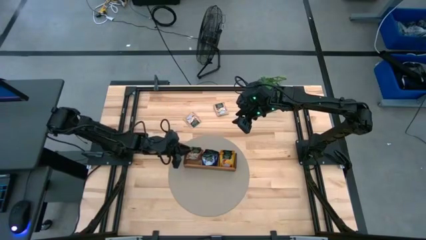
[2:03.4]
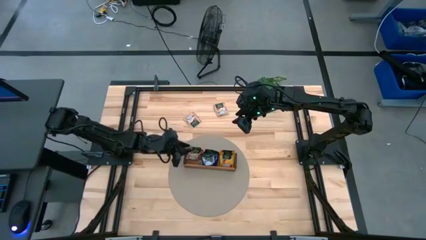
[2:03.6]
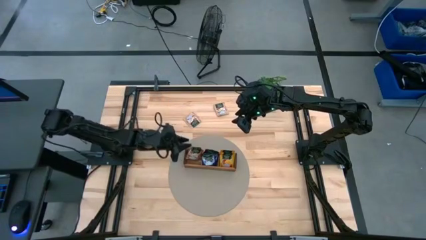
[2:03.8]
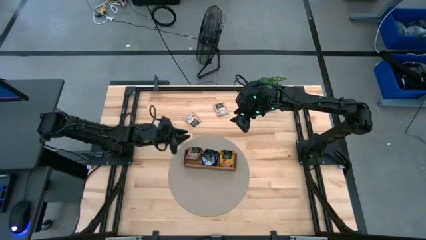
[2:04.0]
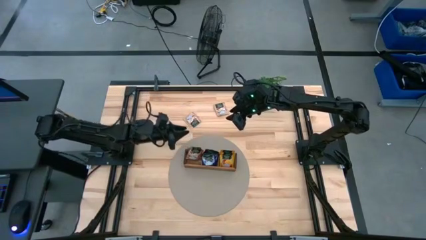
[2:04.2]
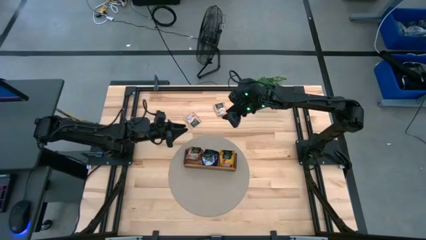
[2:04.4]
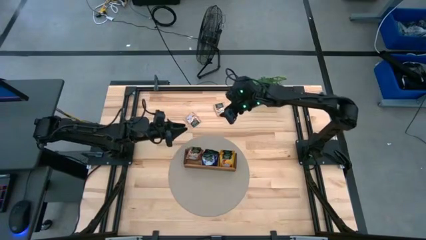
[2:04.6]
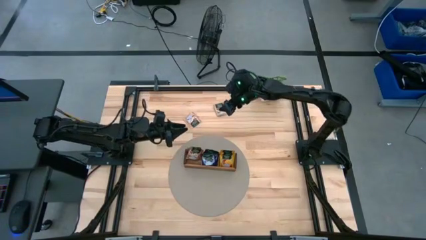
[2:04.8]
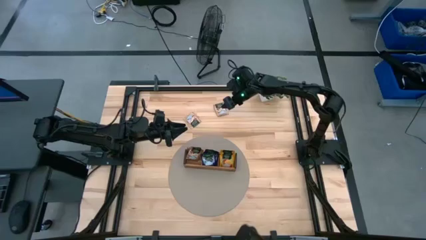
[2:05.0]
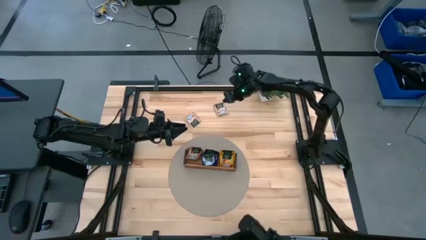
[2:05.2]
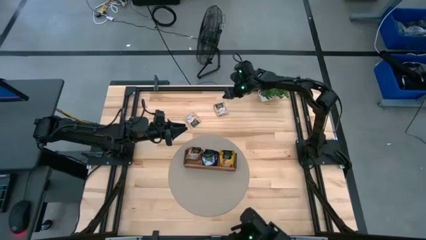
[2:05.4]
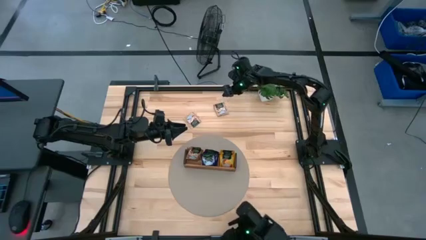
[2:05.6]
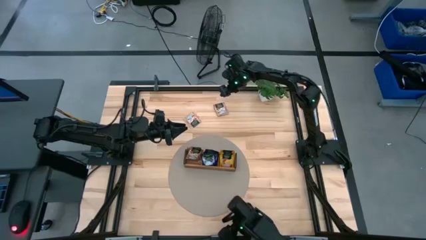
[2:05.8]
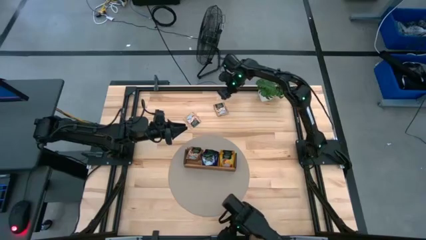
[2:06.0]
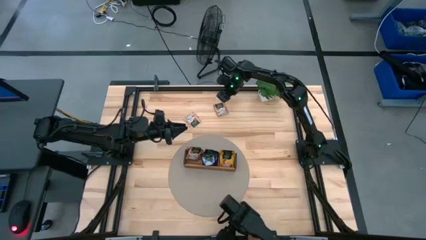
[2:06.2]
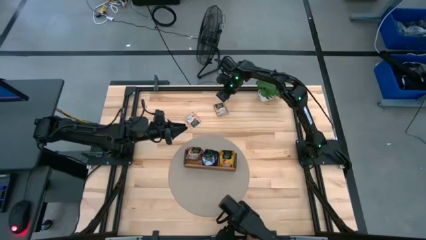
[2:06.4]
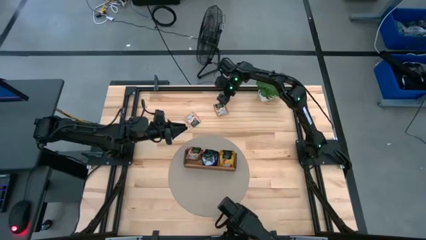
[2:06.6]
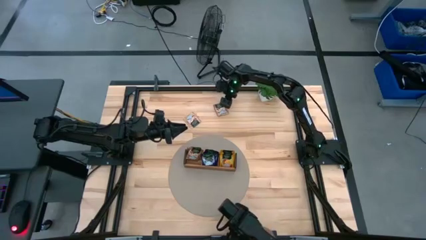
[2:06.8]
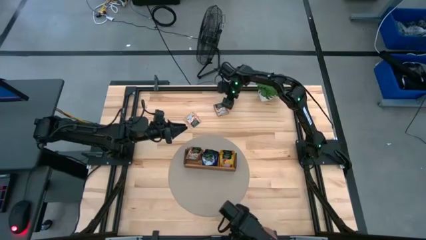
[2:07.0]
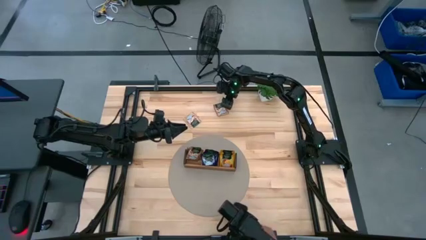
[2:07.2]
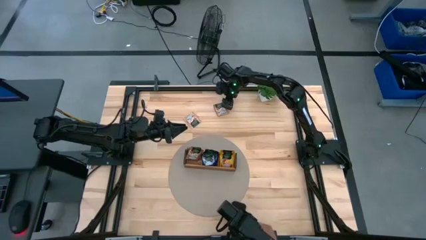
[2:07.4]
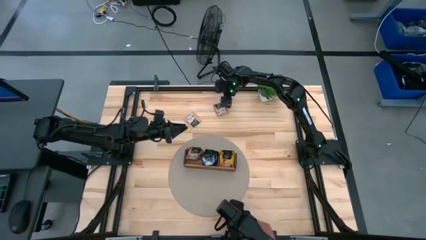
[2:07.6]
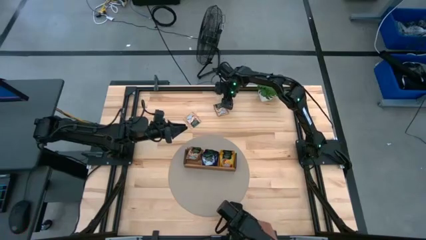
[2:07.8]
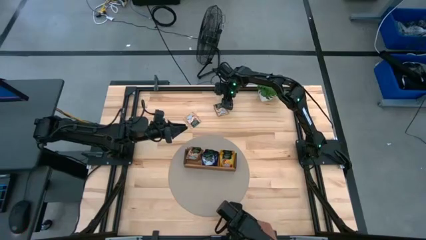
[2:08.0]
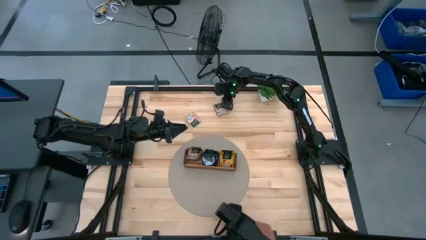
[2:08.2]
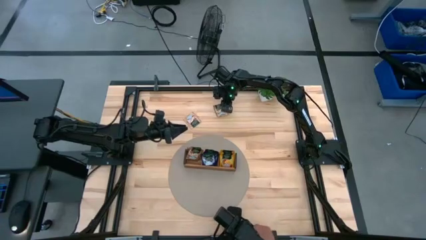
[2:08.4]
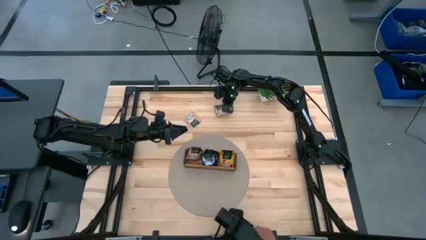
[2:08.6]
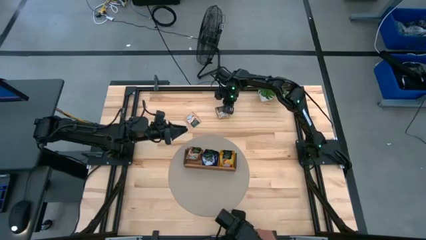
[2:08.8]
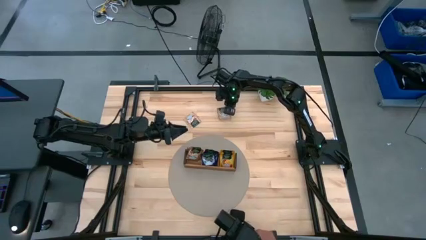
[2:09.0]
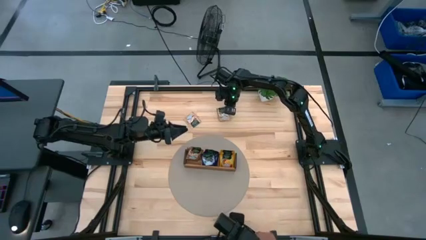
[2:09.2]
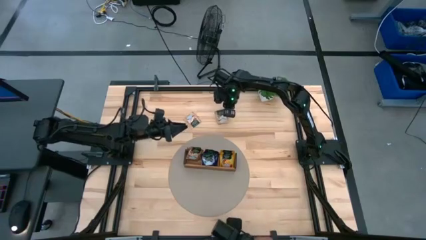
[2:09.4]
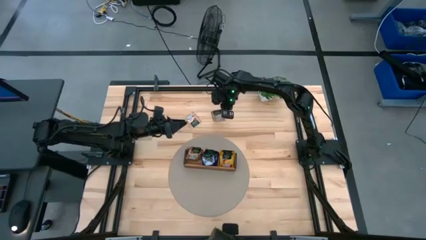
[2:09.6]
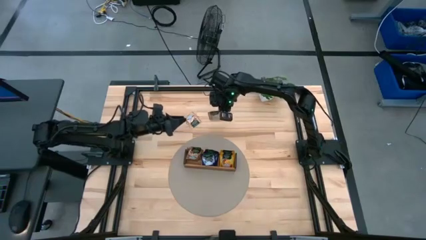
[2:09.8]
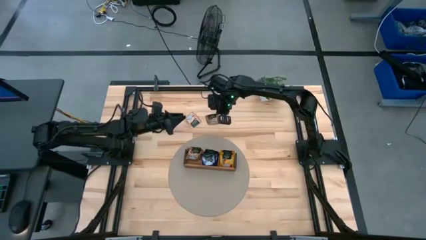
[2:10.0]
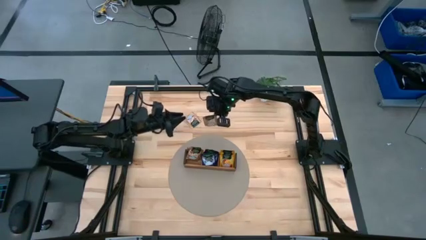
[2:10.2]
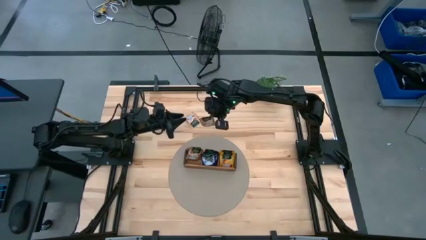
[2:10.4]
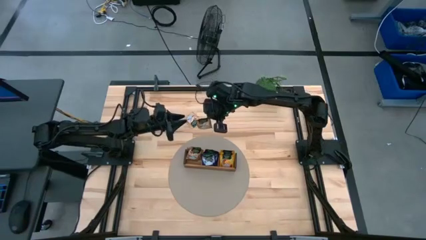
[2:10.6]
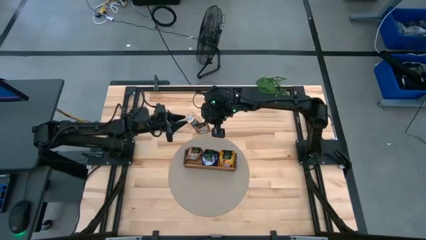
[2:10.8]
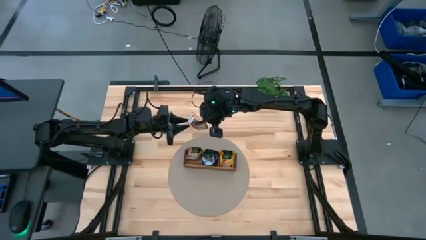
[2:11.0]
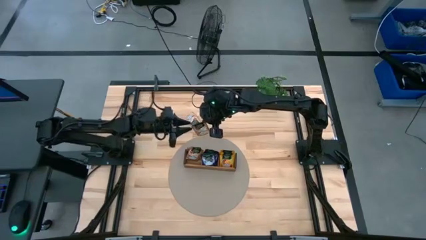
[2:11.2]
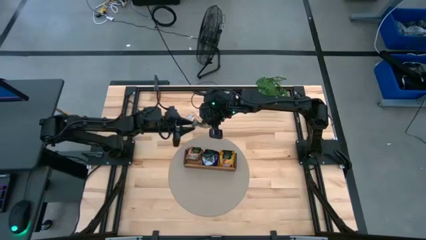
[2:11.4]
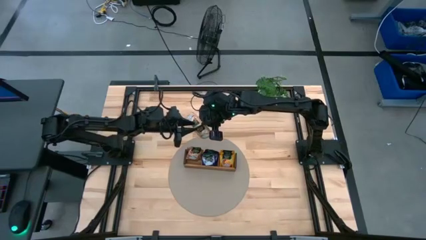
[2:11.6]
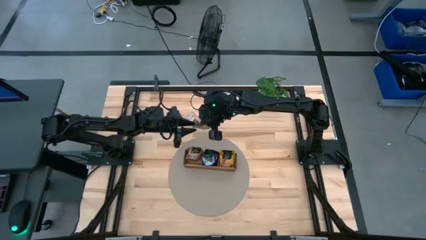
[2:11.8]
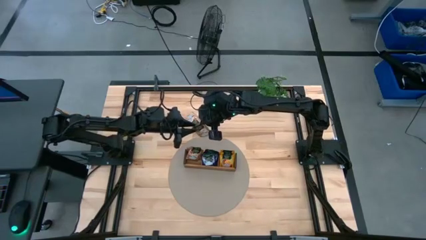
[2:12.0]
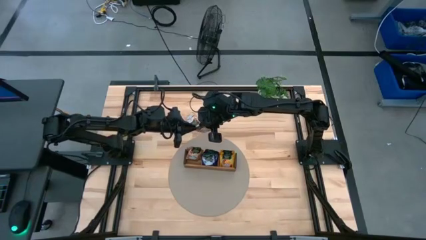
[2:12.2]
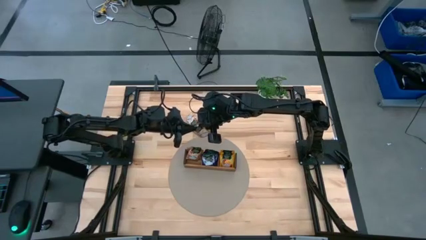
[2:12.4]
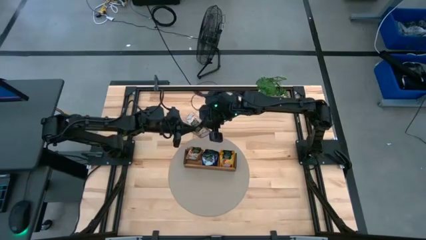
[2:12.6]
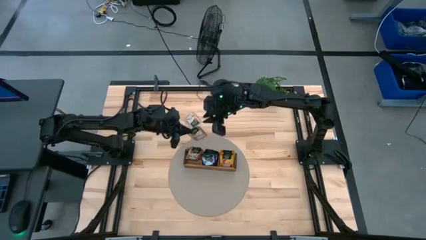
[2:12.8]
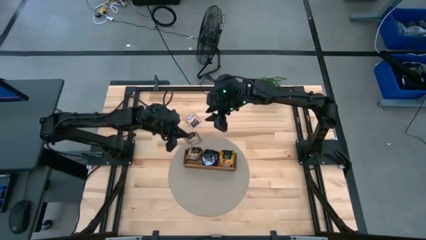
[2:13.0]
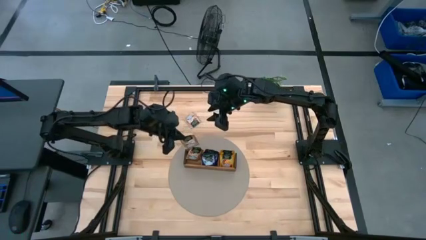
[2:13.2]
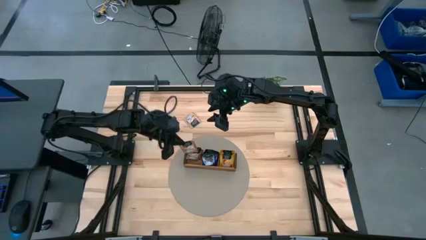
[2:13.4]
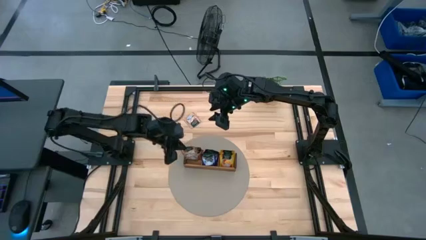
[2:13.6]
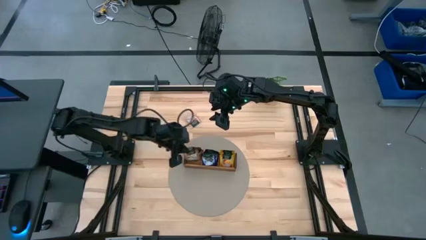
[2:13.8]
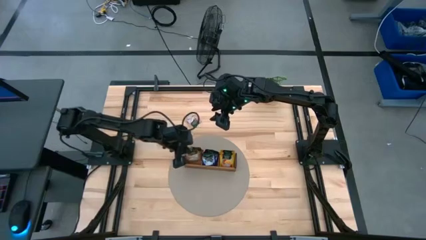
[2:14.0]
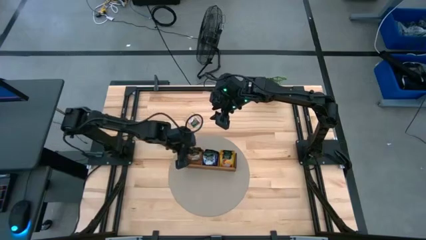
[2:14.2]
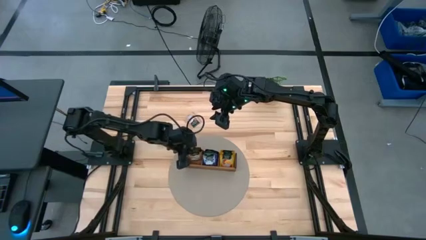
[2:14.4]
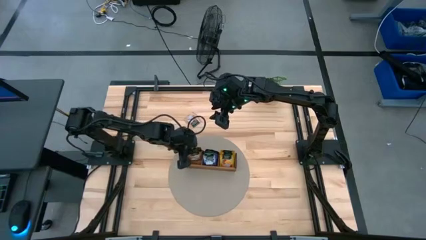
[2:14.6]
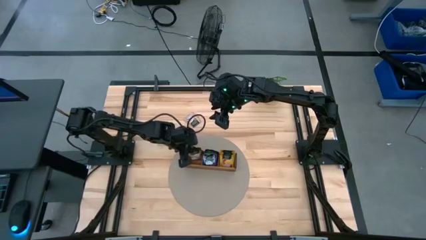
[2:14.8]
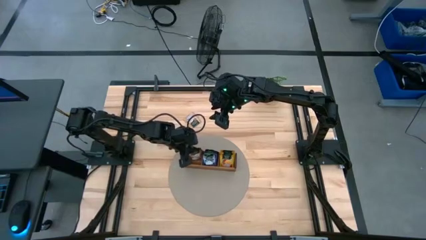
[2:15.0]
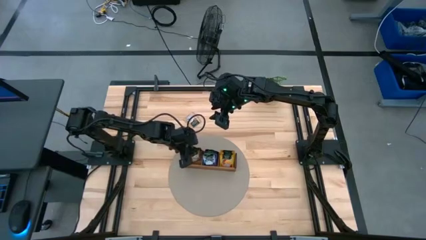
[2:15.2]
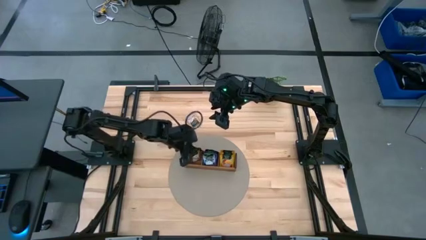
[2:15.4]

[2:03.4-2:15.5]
Task: Pick & Place Tea
Put the brown tea bag into the left section of the wooden organizer

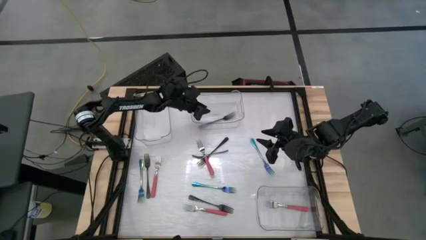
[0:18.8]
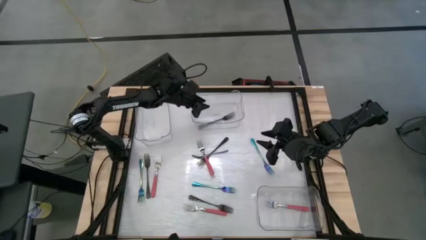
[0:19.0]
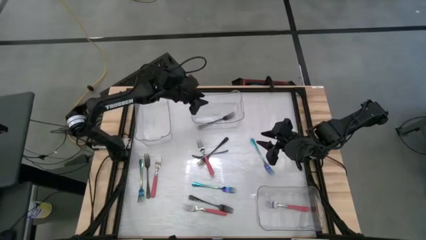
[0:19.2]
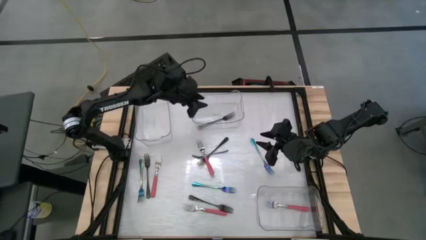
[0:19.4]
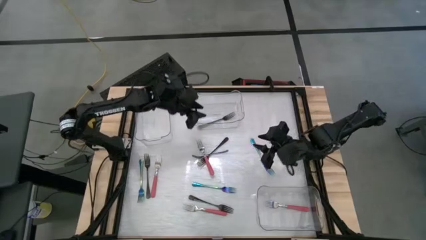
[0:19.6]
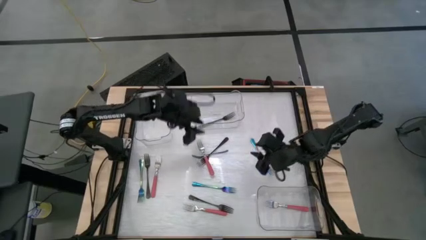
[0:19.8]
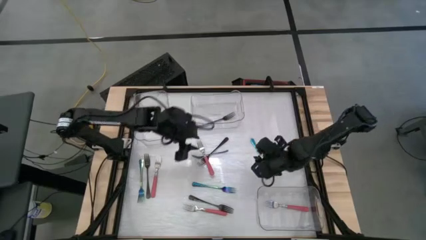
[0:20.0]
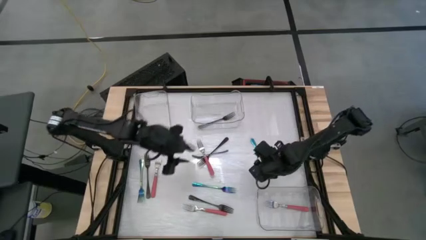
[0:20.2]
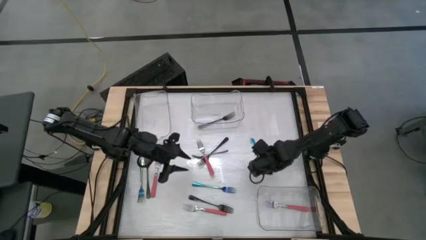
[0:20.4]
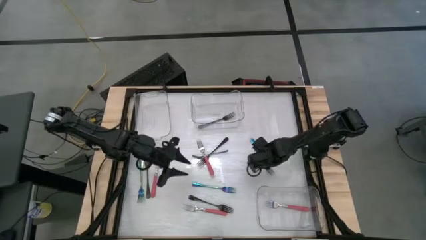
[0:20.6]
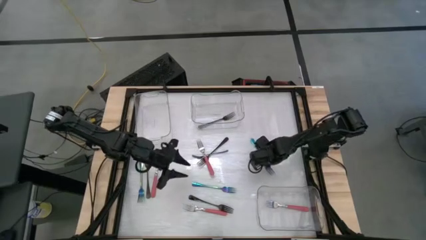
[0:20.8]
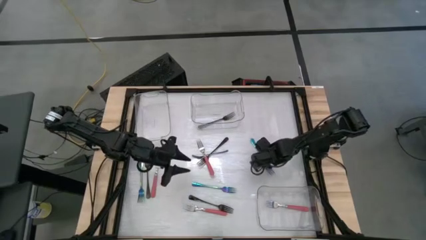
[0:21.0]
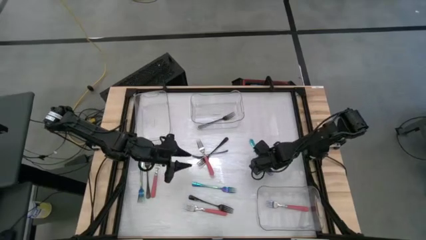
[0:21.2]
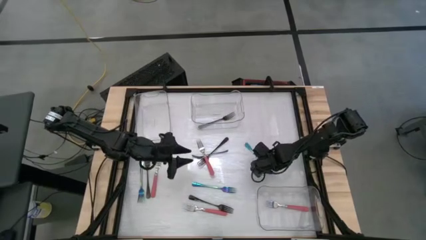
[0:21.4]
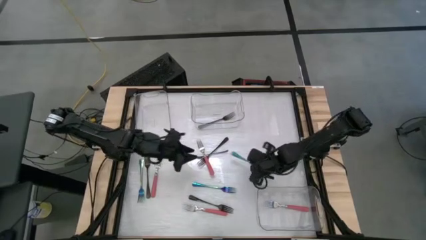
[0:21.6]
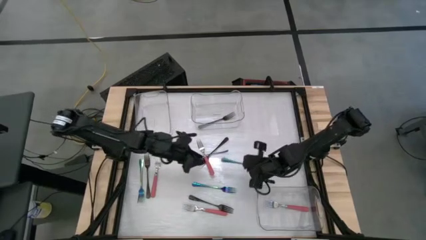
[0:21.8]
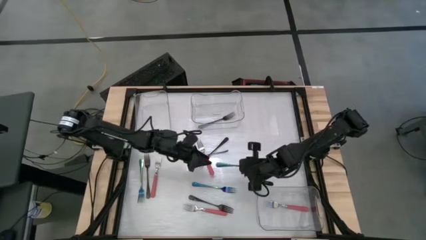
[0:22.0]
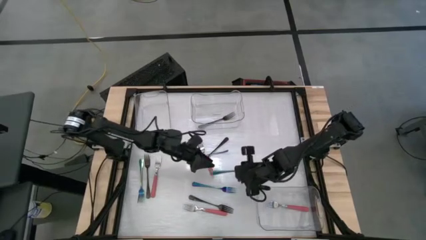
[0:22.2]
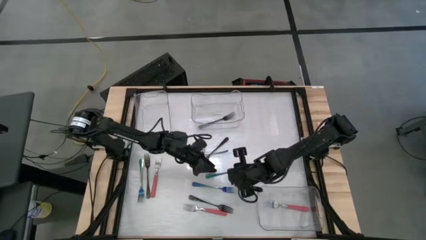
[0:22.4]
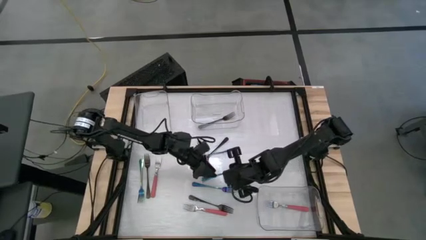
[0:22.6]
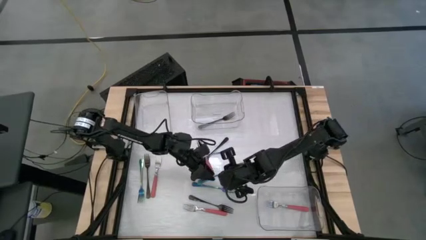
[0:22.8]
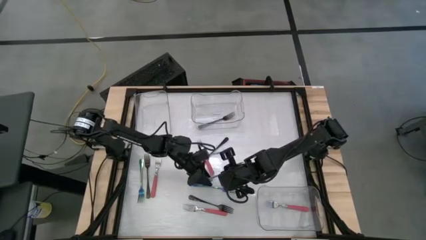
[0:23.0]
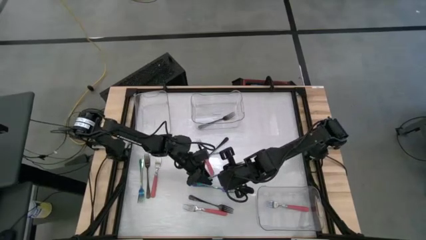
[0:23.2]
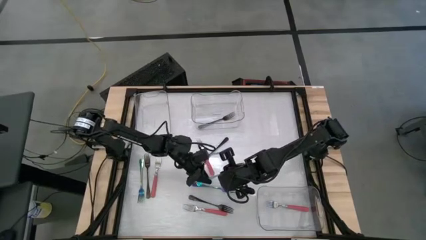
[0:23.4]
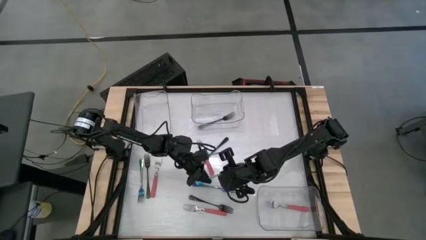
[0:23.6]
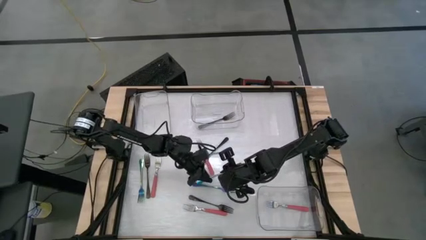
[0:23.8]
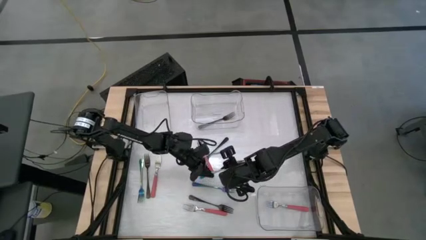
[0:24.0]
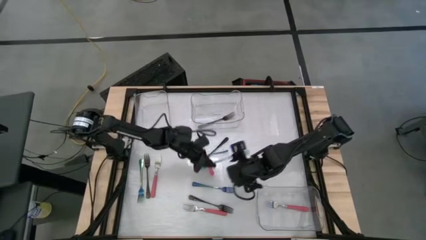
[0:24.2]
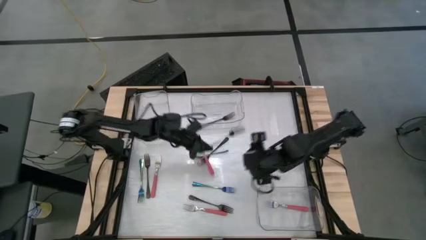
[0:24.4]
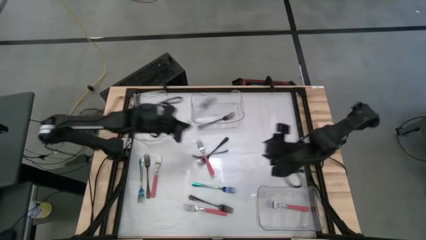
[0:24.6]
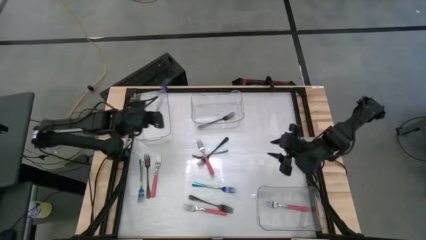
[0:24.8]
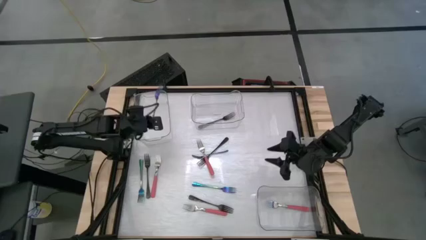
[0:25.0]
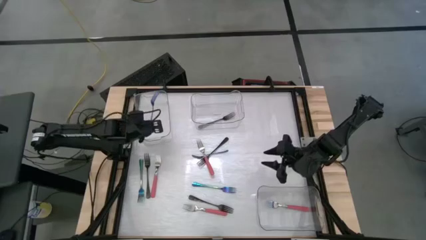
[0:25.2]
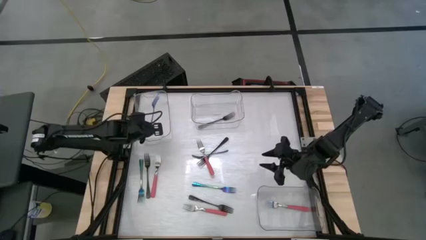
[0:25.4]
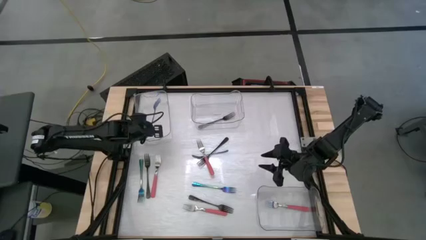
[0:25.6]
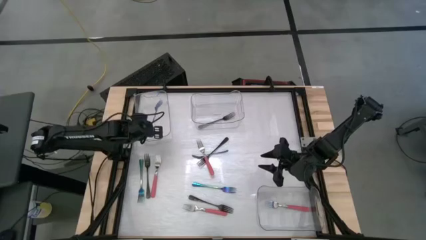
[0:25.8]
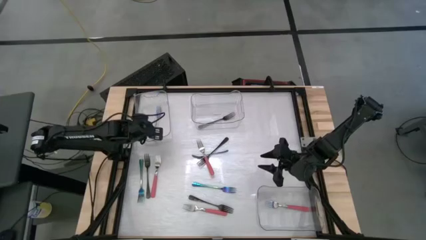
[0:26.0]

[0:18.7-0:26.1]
Task: Sort silverware by color (type)
Put the purple fork into the top left transparent bin
